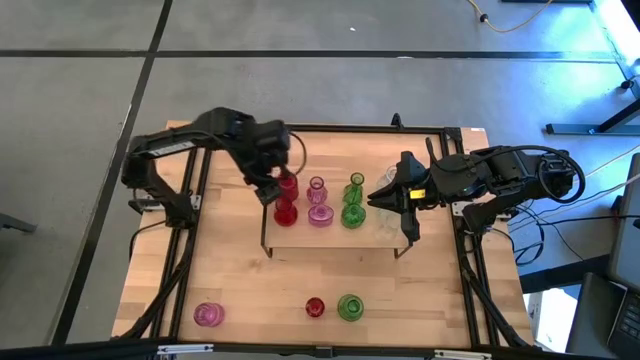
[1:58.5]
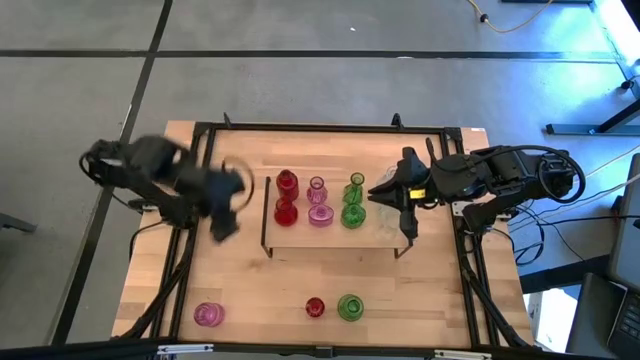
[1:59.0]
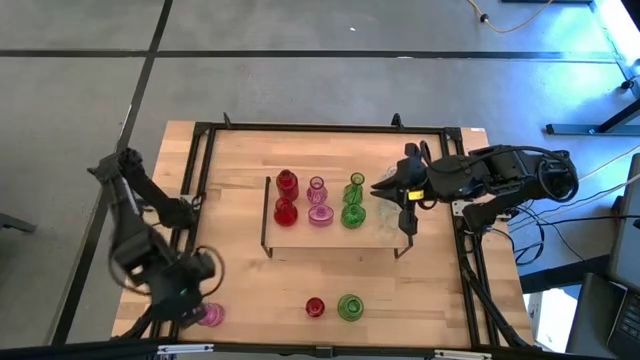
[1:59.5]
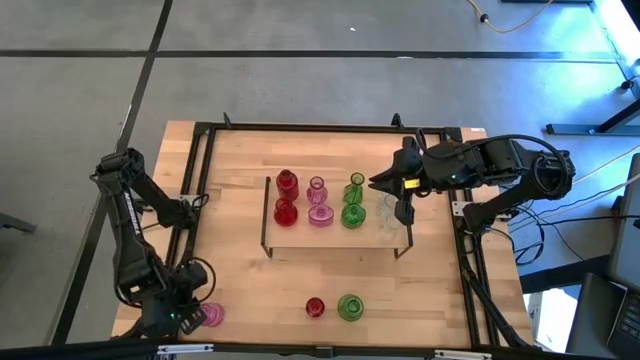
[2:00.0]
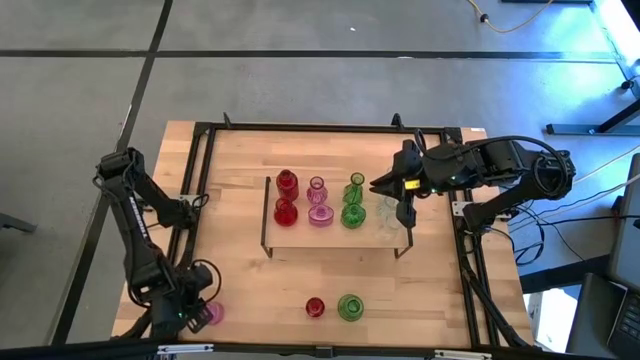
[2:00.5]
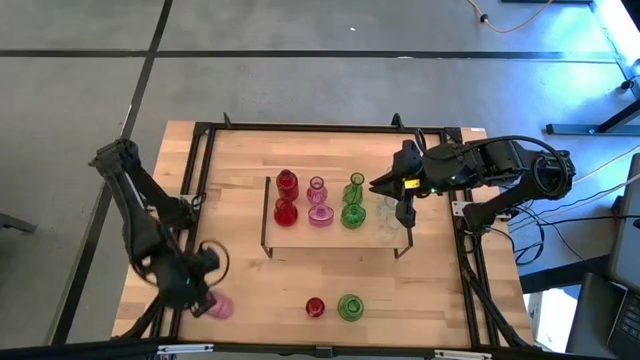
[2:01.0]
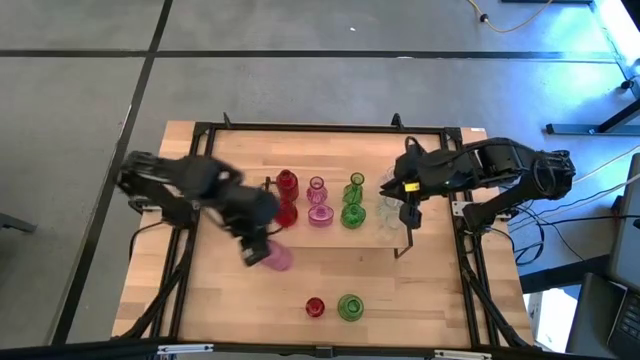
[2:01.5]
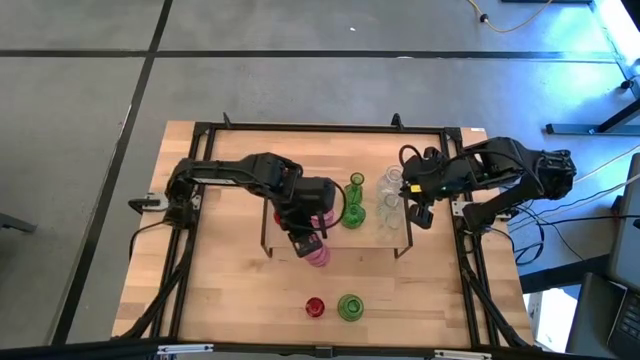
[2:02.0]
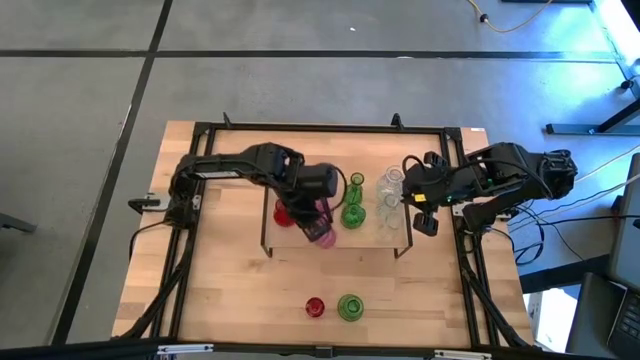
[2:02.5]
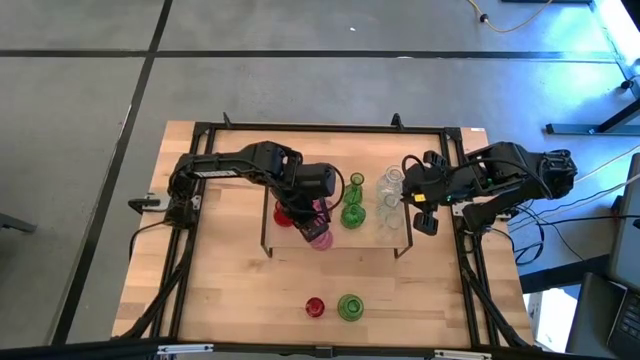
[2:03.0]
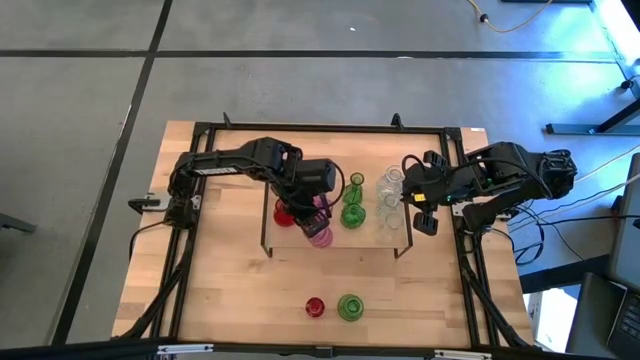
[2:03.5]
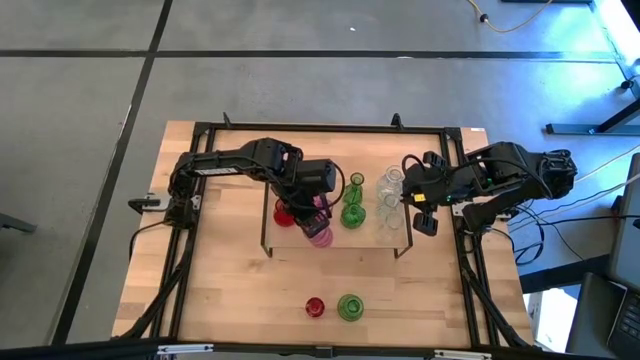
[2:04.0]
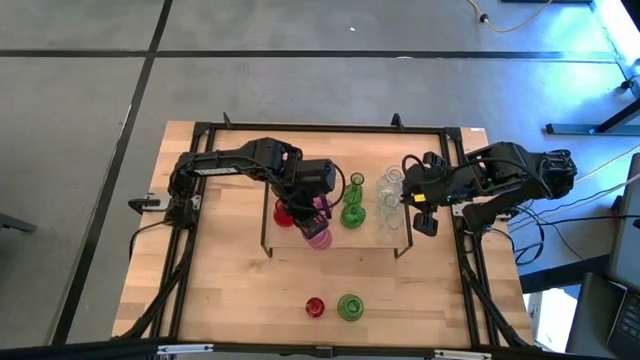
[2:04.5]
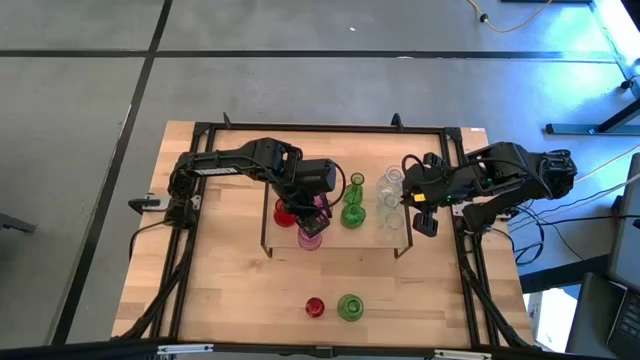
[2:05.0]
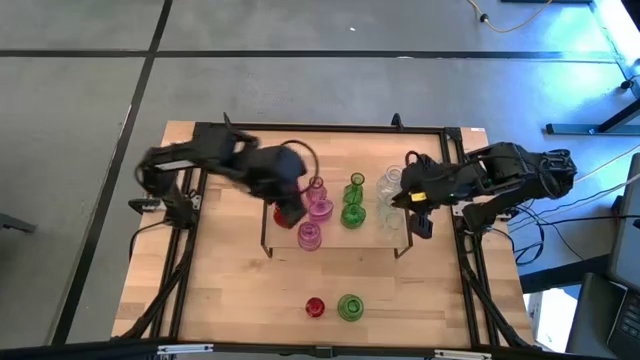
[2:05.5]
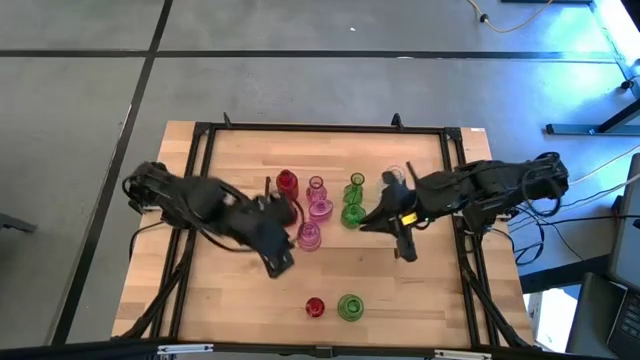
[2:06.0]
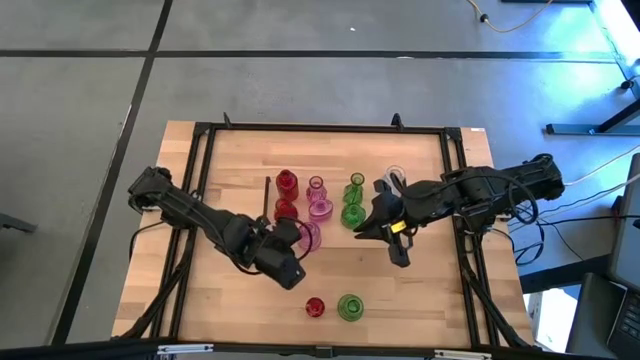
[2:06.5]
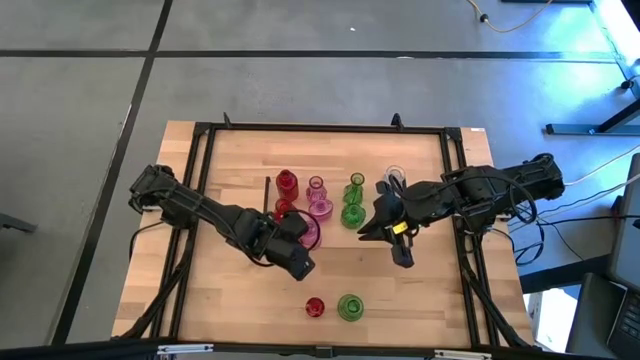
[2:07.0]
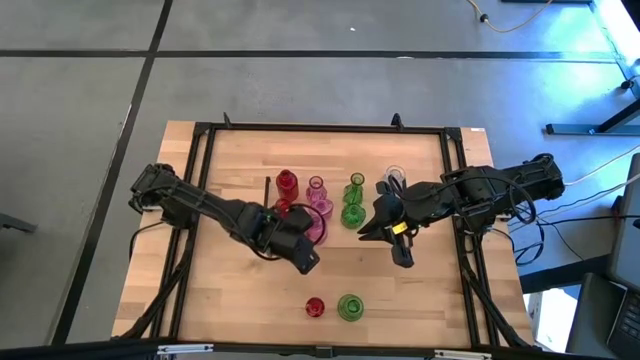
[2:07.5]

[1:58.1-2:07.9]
Task: sort vases onto shelf
Put the violet vase on the shelf aligned with the other violet vases

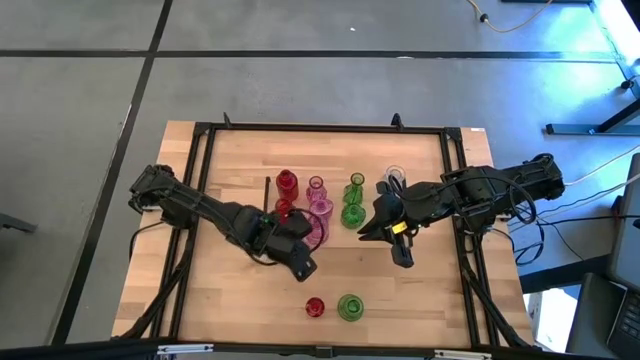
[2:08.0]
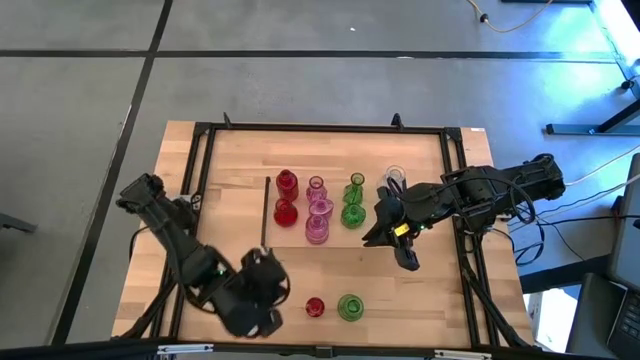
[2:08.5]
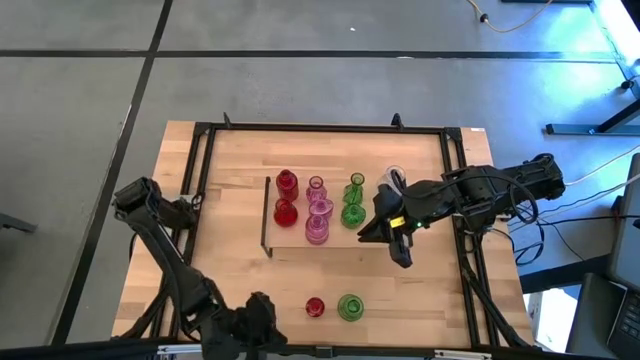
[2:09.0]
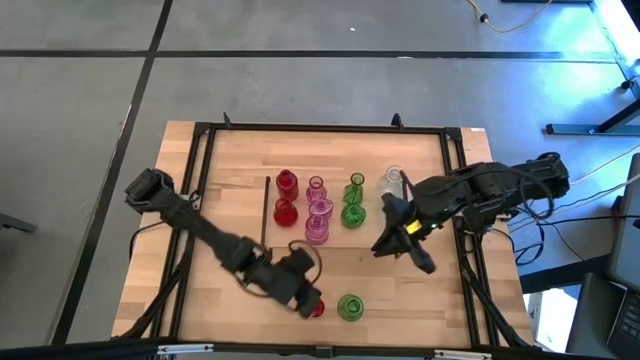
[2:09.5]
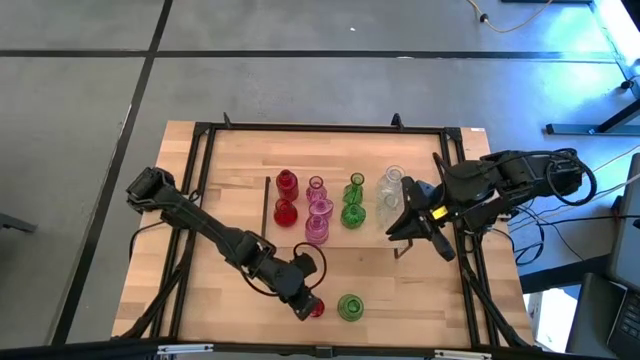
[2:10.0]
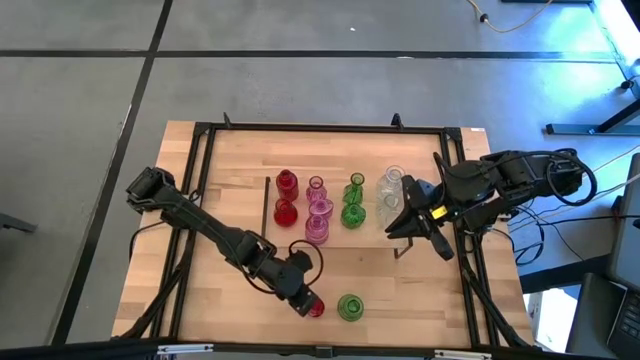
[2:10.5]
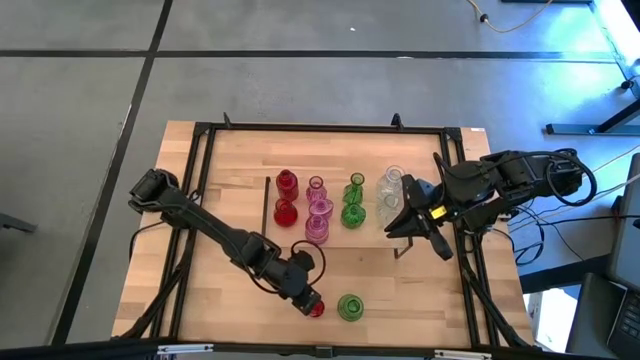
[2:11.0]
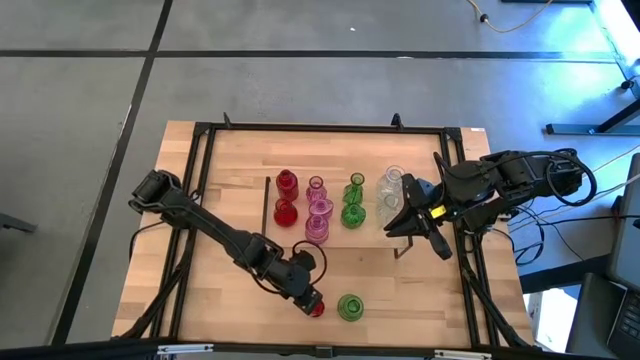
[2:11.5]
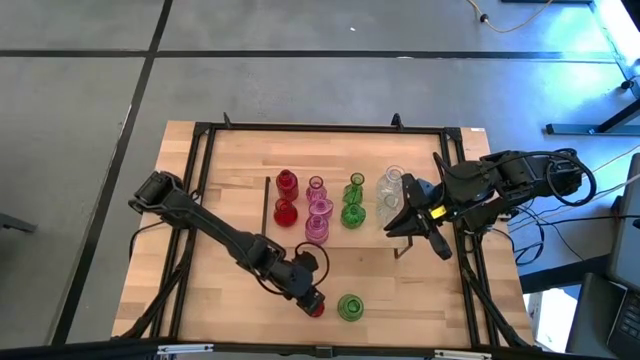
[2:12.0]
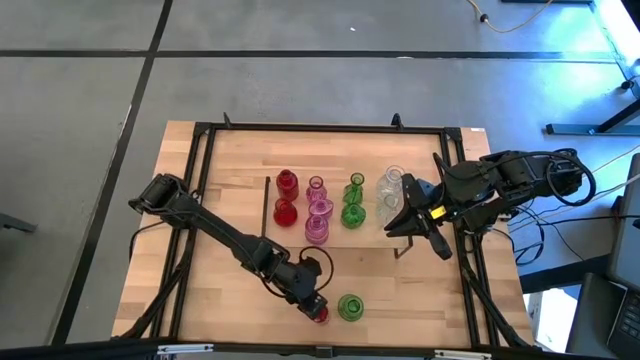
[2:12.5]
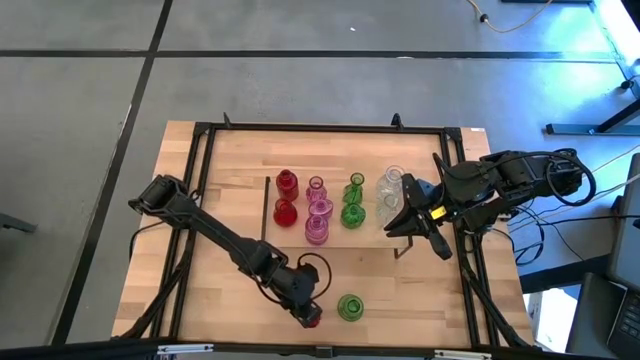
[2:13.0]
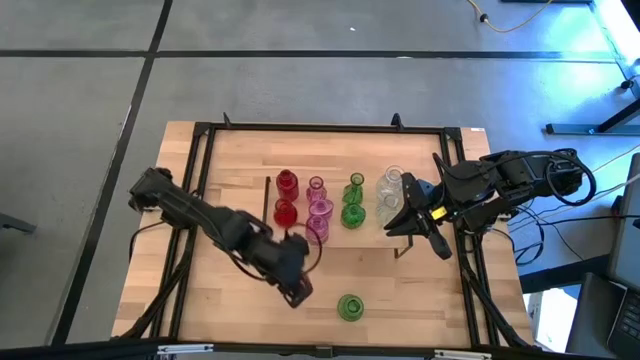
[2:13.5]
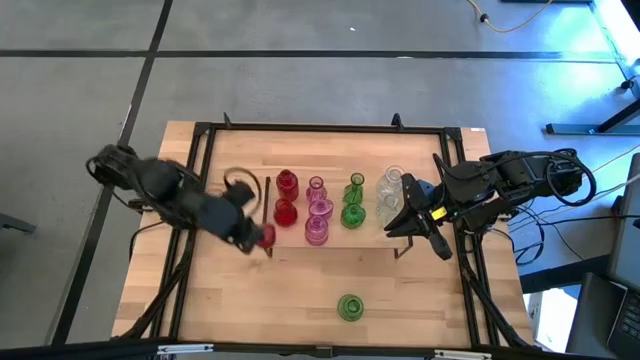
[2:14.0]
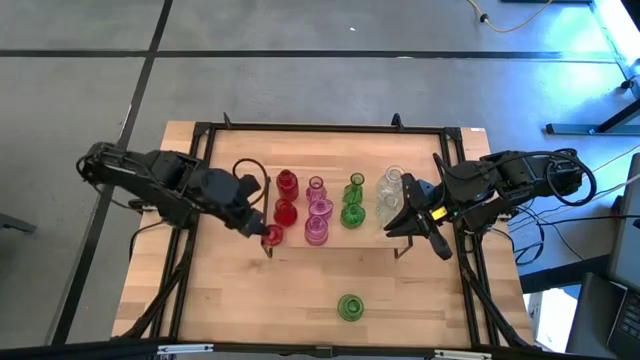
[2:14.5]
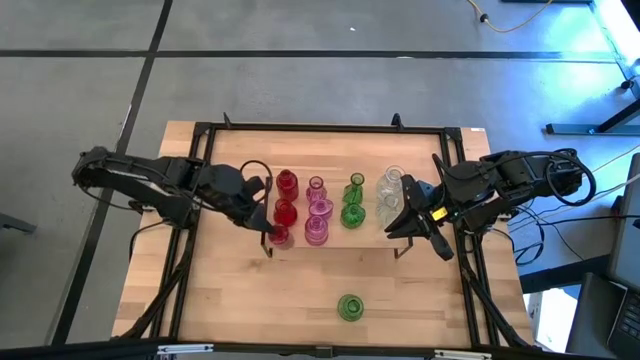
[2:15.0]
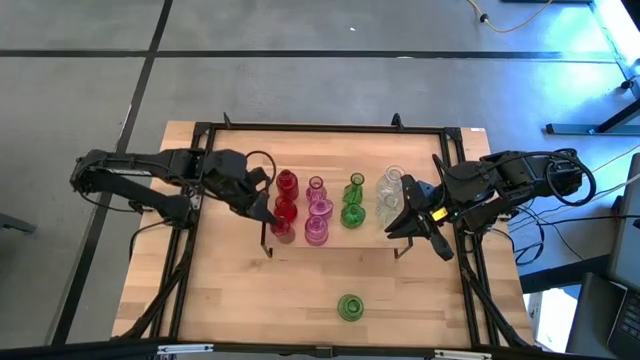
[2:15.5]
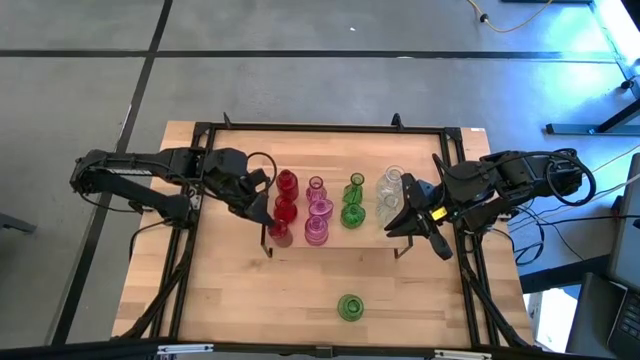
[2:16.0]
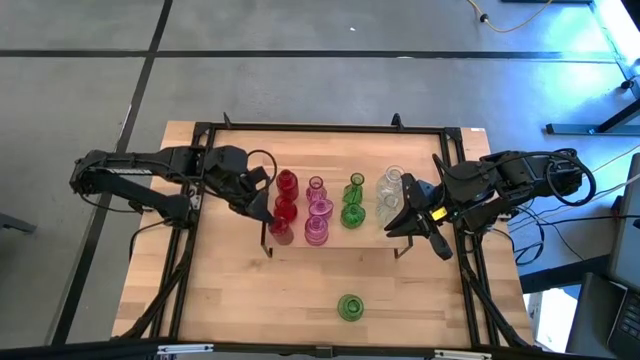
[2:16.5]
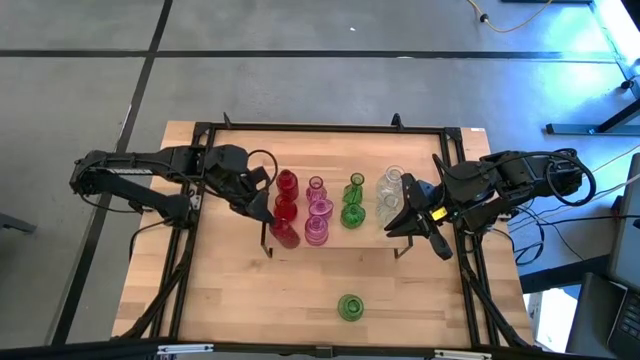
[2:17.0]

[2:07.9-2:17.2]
Put the red vase on the shelf aligned with the other red vases

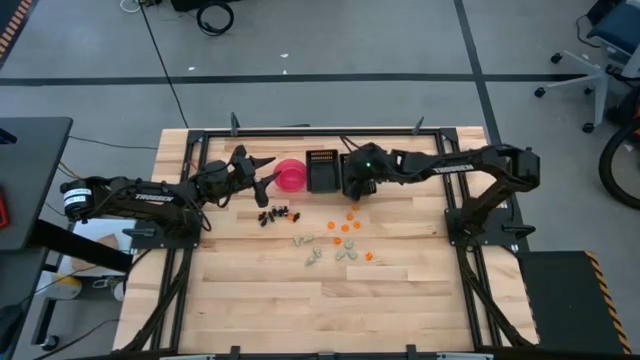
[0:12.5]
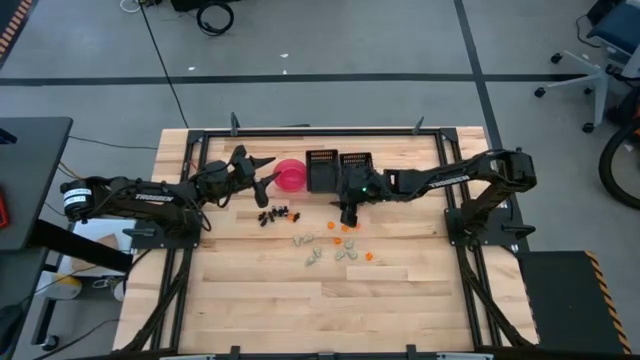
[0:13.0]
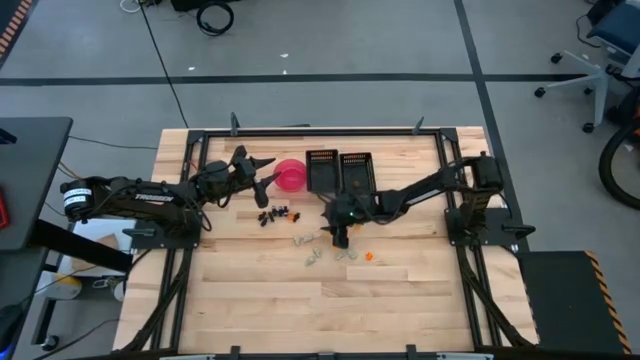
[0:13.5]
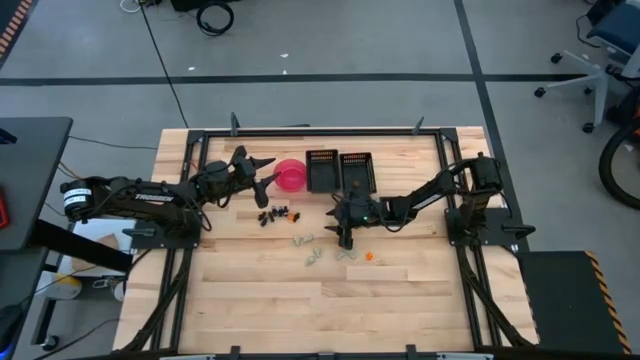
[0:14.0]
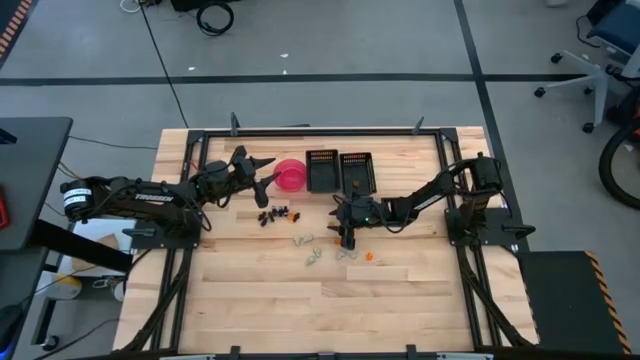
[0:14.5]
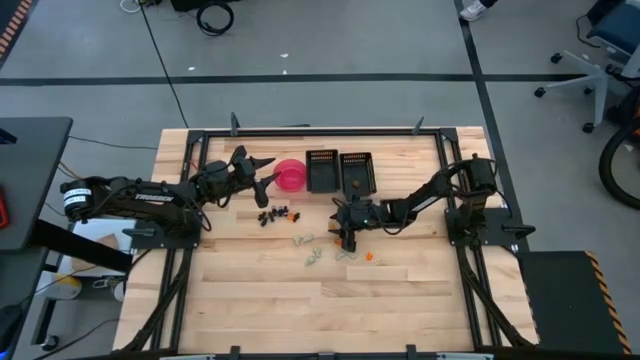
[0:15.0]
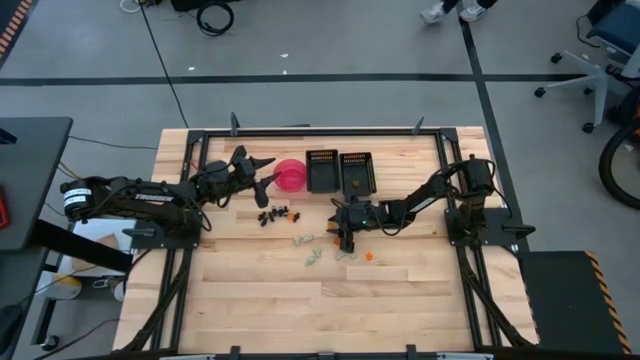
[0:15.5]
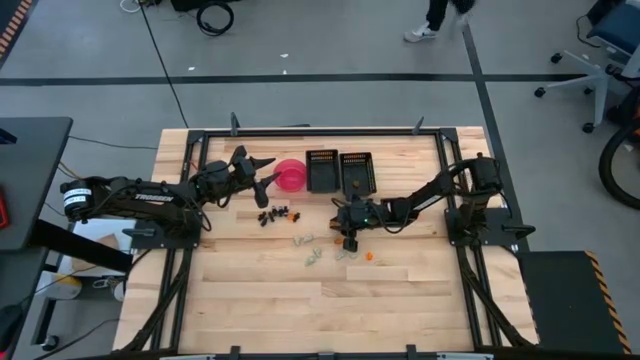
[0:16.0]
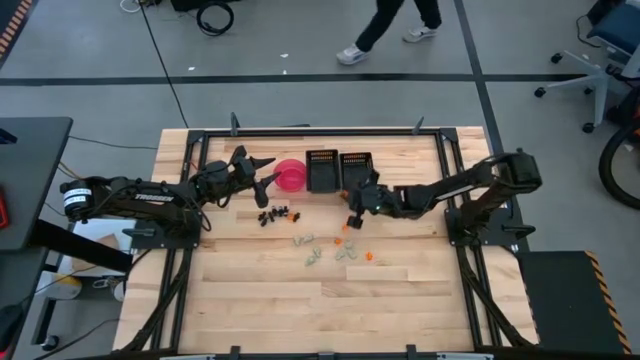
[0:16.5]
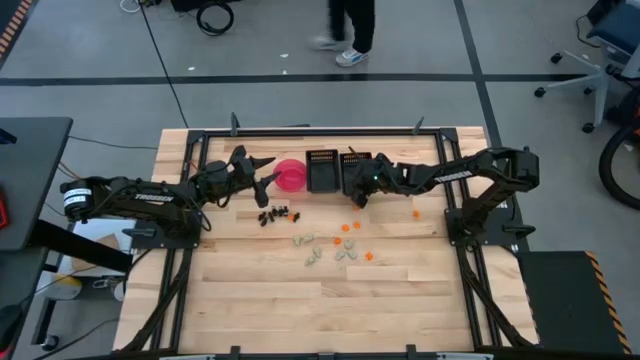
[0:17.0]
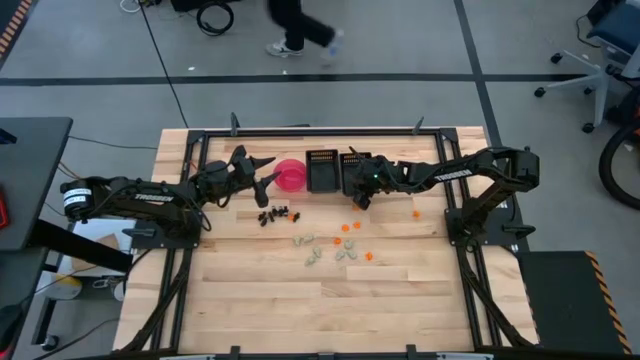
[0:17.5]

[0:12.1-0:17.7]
Task: Sort Halloween decoration
Put the orange pumpkin toy into the right black bin
